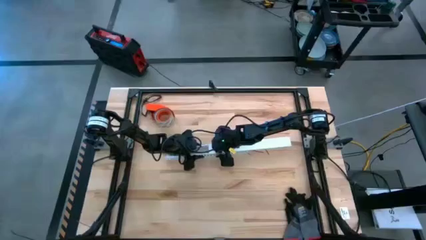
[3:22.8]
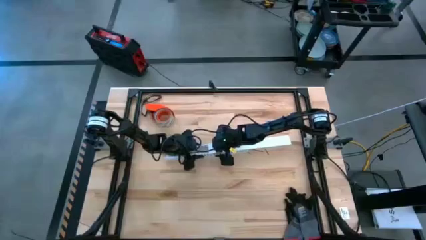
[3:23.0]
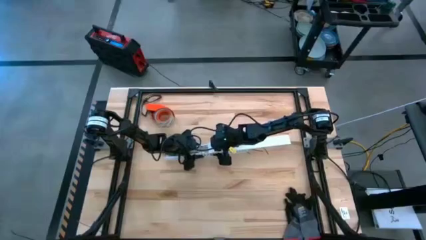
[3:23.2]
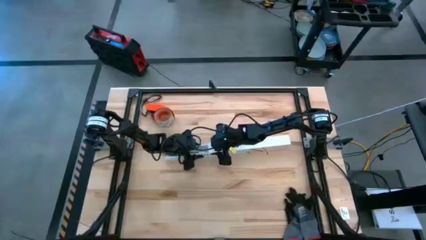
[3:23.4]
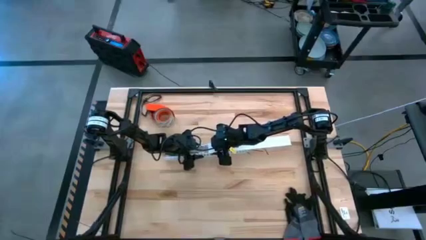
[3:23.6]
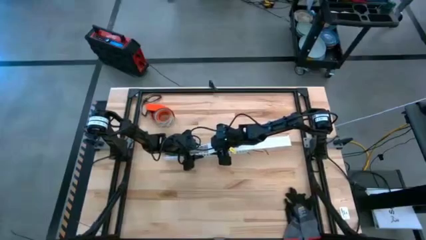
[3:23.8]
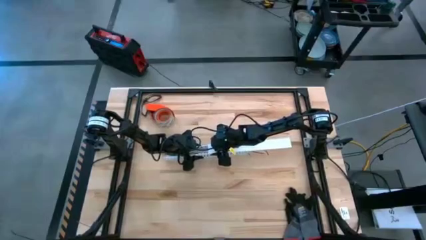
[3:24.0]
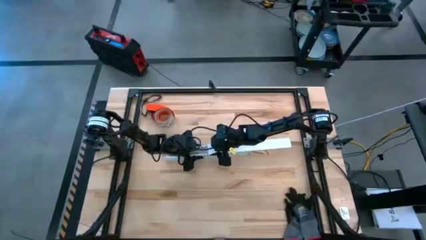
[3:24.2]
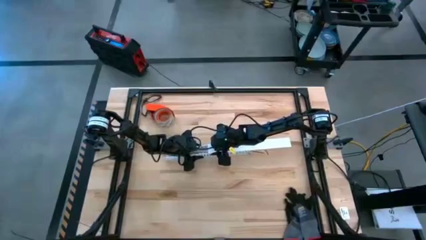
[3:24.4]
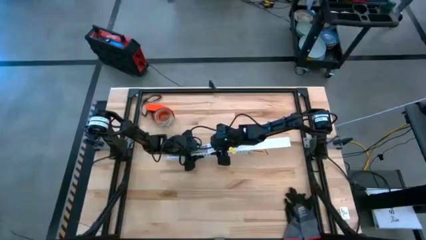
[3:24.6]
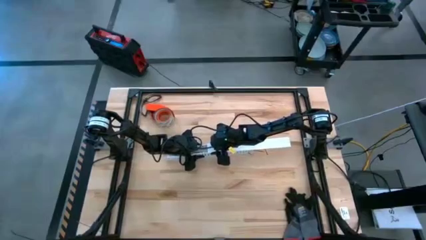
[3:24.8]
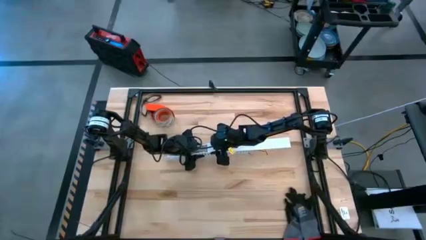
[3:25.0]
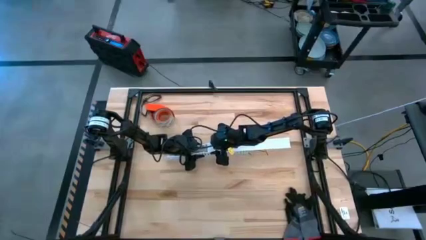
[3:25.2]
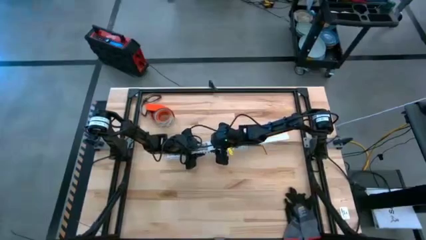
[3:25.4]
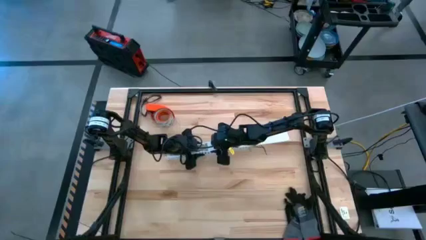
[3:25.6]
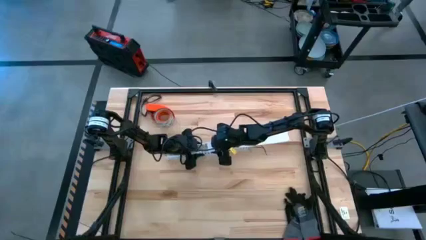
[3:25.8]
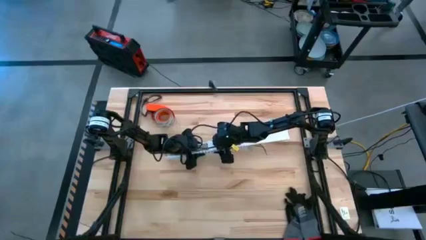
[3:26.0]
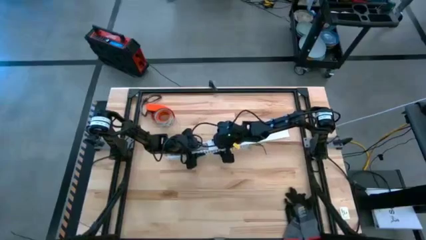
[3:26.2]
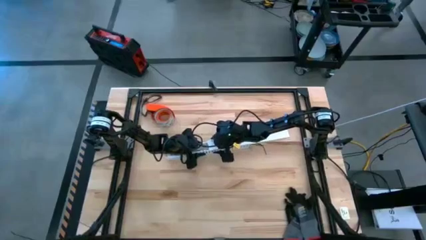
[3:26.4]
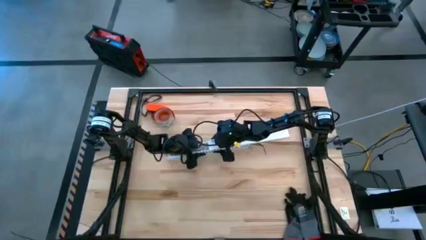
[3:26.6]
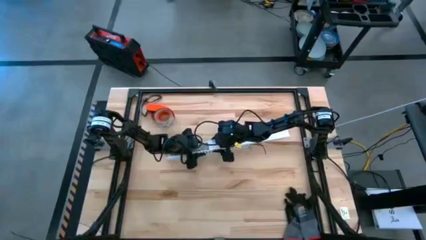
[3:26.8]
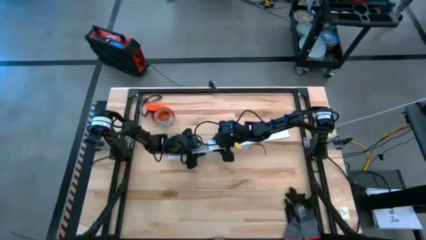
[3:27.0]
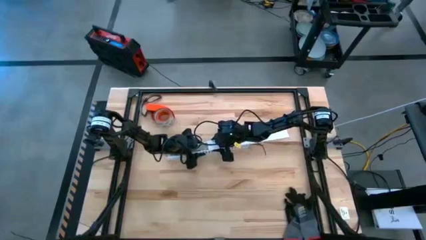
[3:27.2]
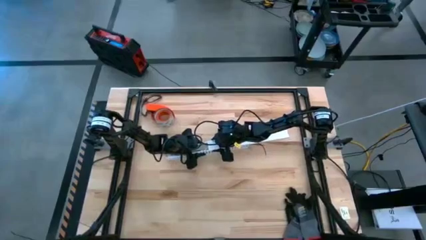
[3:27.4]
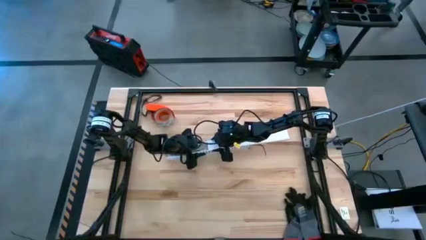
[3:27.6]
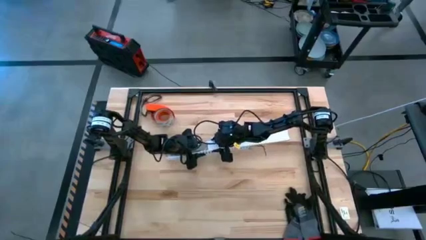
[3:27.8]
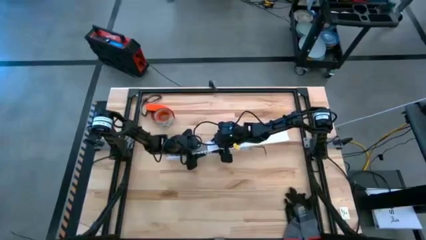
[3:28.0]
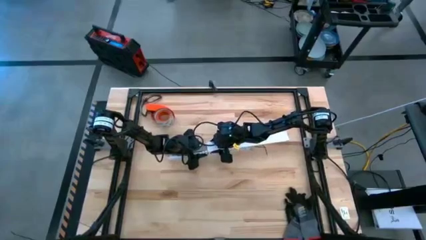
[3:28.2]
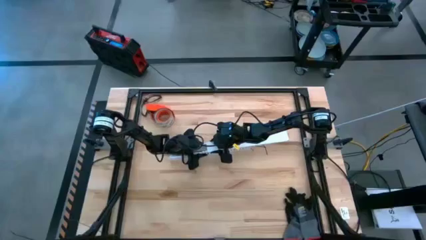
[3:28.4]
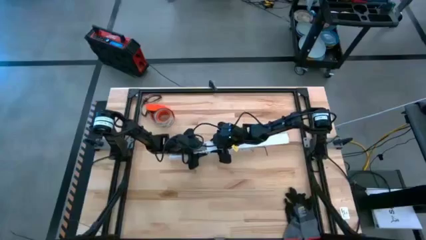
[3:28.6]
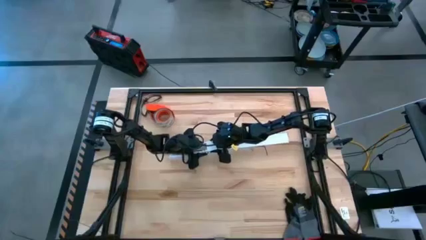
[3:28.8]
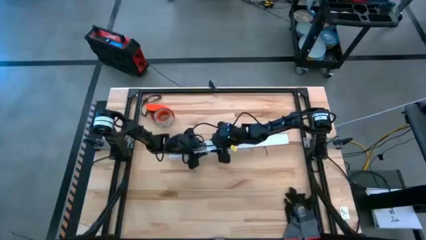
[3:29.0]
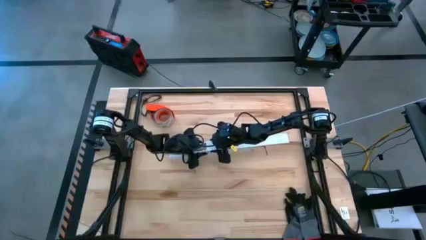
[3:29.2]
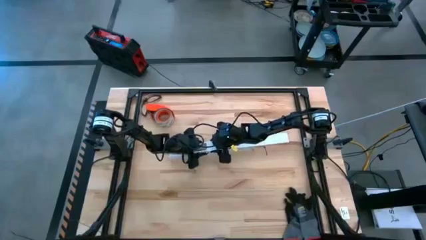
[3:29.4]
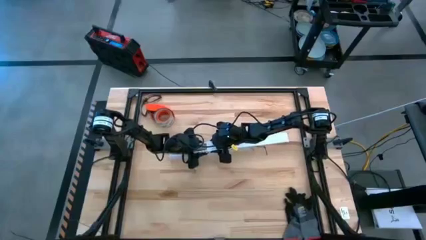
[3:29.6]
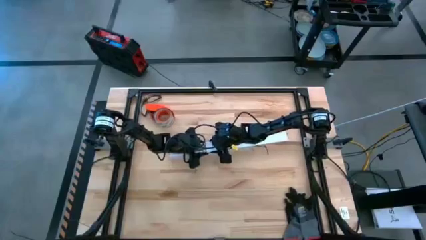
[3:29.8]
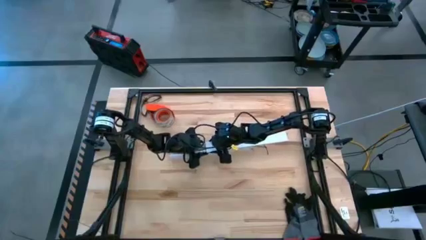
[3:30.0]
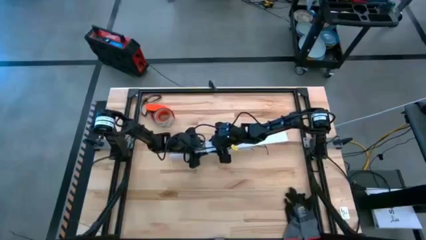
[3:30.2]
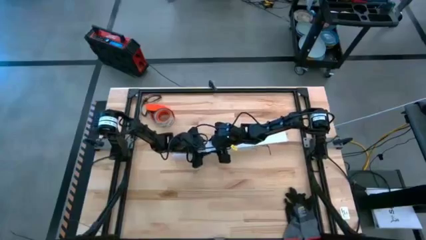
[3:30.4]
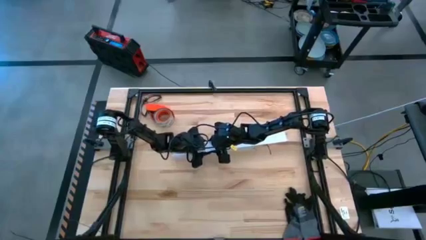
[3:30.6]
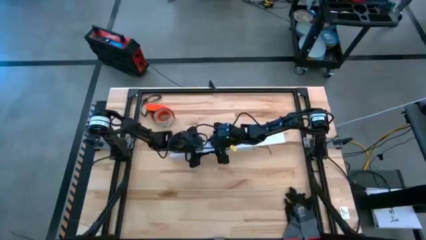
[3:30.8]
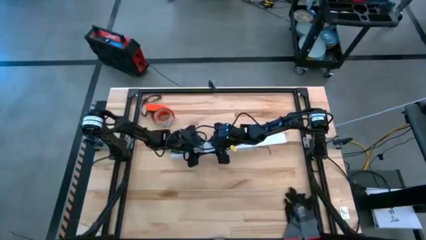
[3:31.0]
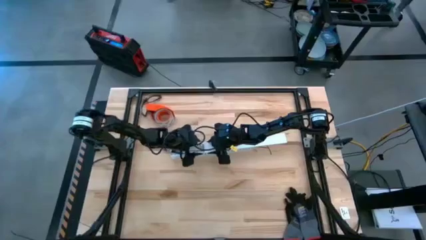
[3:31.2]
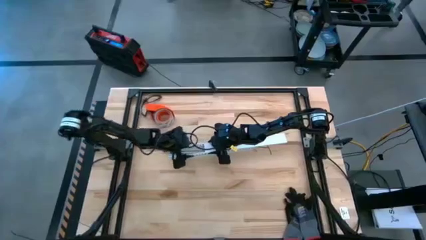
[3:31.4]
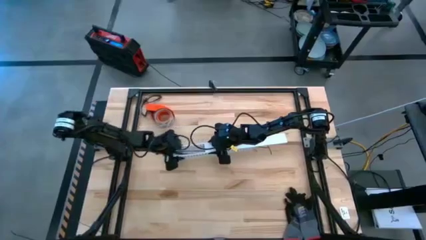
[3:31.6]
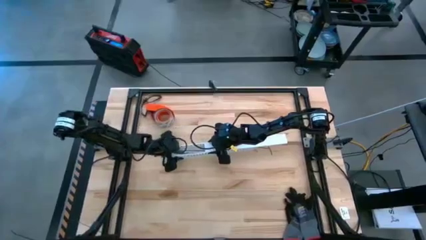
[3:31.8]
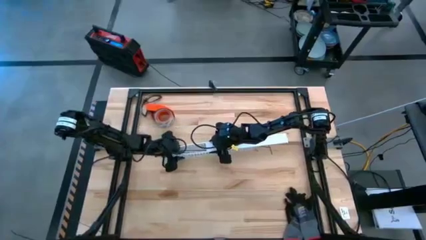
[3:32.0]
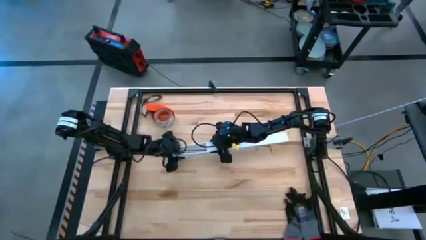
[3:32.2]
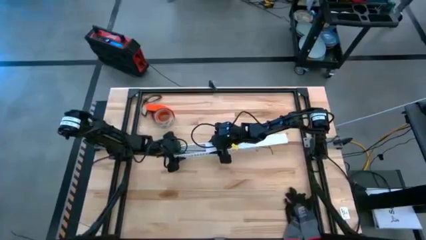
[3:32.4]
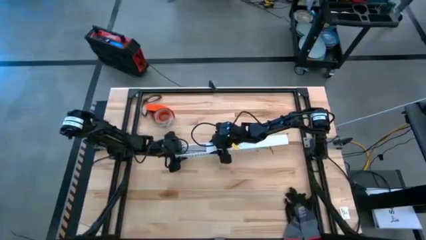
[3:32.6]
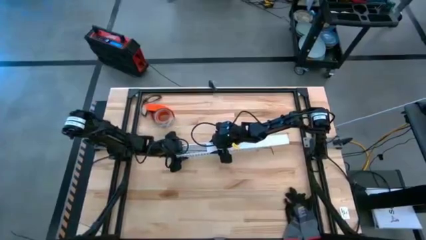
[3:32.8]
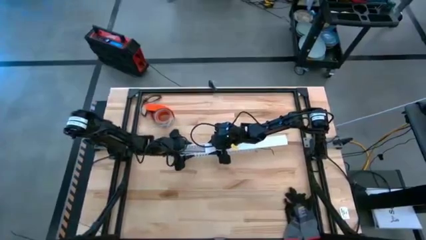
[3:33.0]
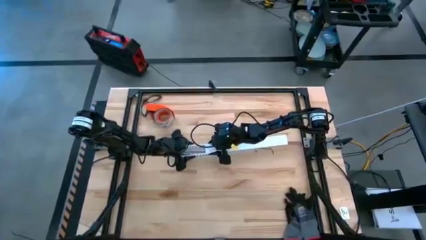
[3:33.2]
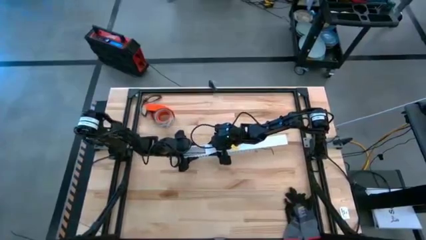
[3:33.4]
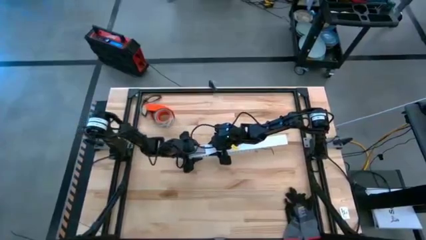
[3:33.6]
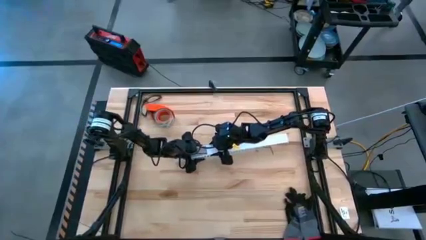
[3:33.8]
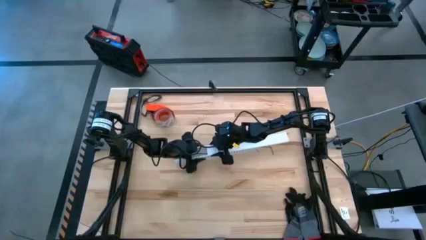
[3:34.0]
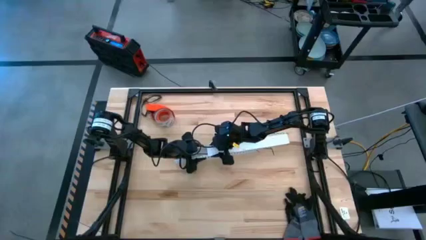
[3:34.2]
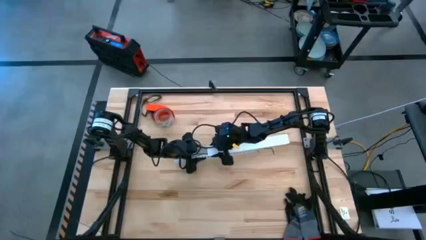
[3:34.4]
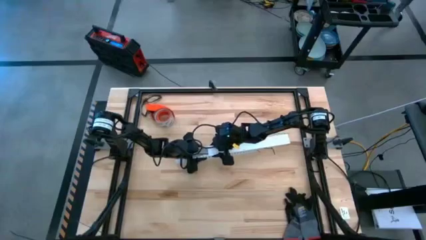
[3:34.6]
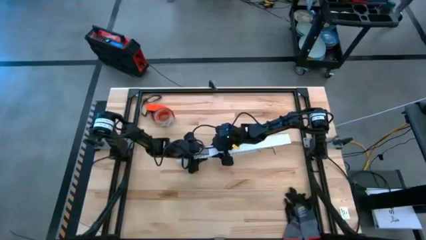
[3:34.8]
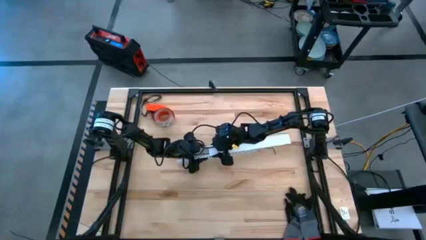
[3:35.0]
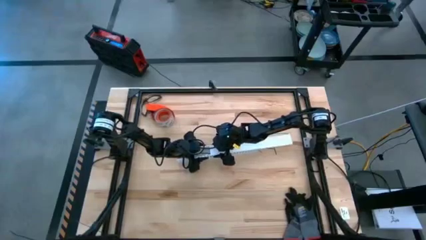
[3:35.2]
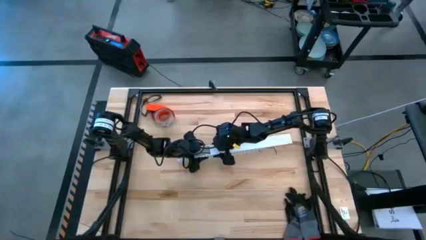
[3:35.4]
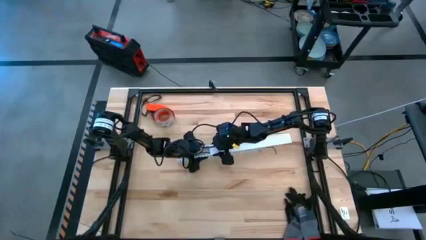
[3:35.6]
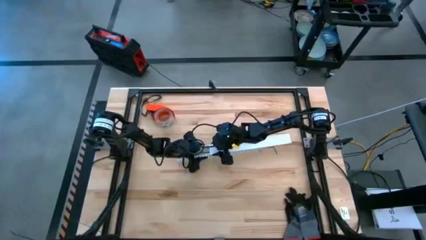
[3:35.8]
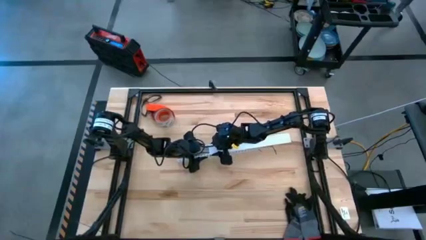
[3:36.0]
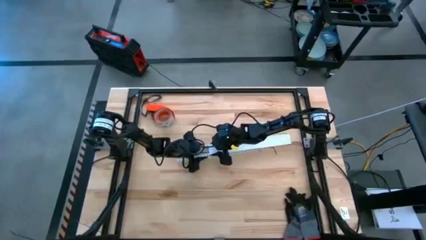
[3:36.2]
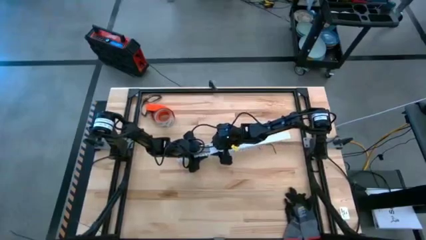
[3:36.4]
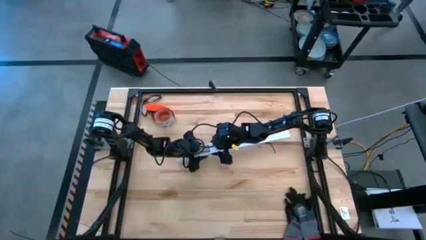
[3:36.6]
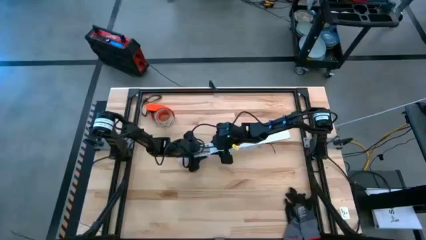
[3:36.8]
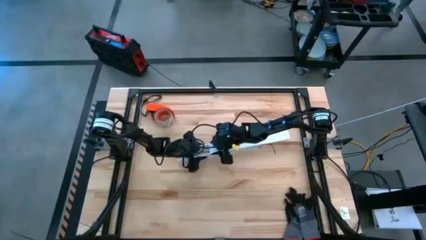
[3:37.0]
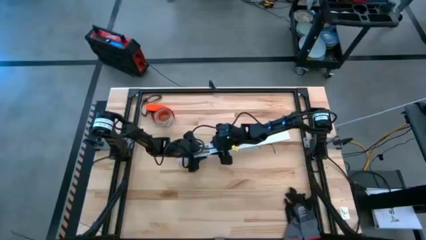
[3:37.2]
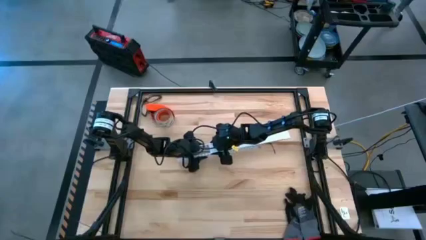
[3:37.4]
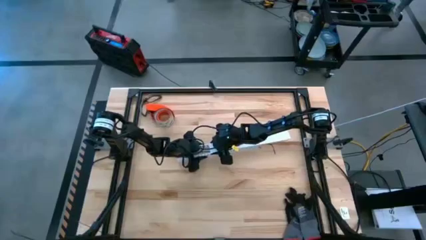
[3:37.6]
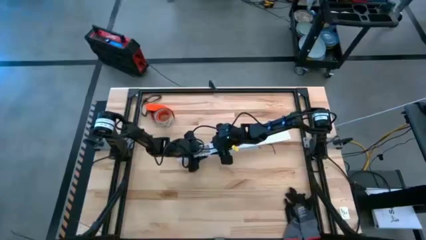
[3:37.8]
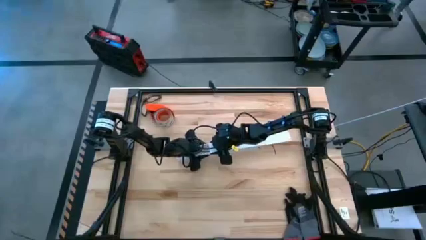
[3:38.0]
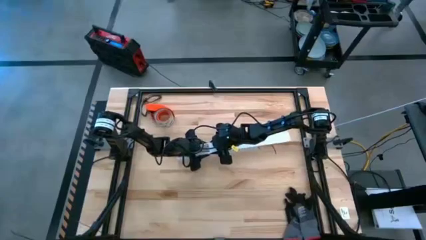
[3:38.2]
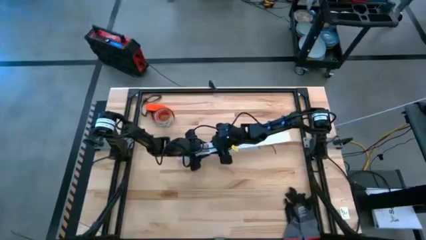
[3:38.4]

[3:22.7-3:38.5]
Task: Ziptie cables
Close the white cable duct
